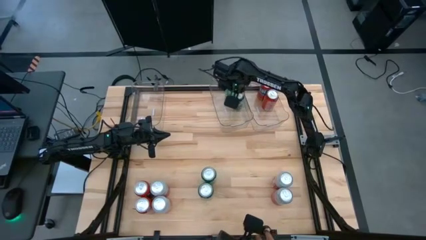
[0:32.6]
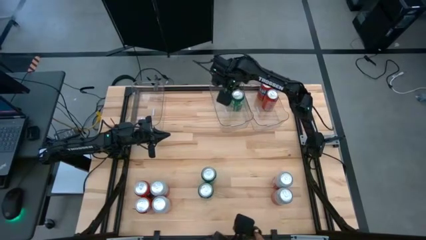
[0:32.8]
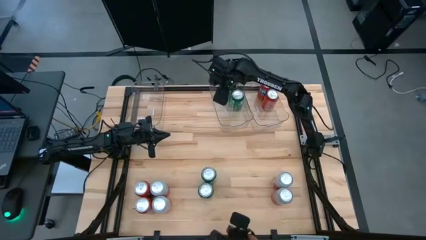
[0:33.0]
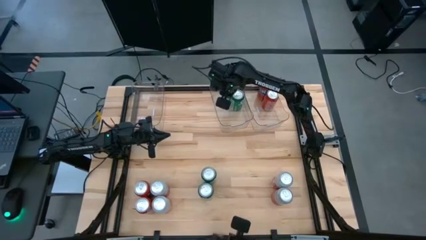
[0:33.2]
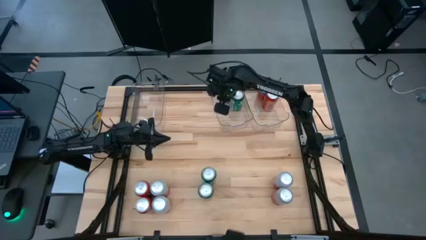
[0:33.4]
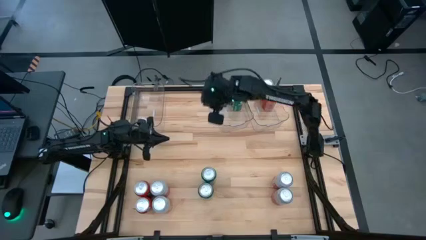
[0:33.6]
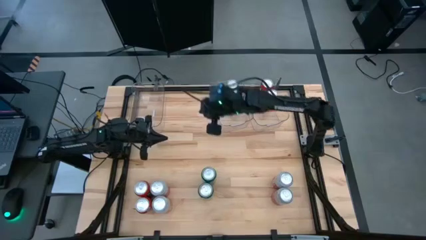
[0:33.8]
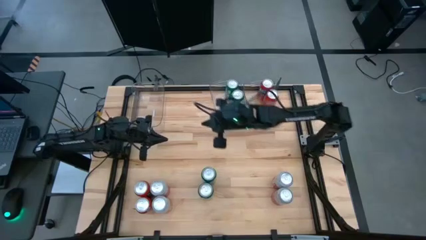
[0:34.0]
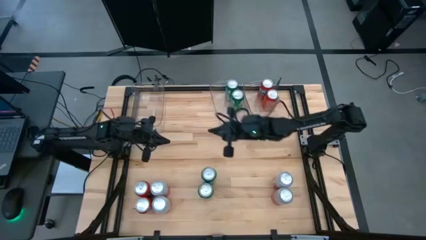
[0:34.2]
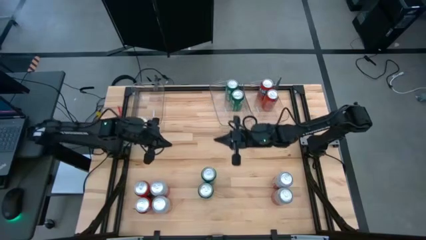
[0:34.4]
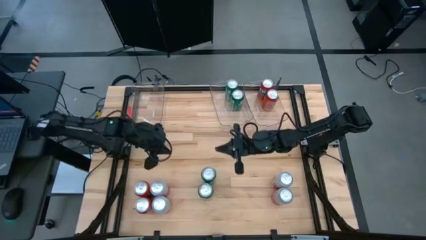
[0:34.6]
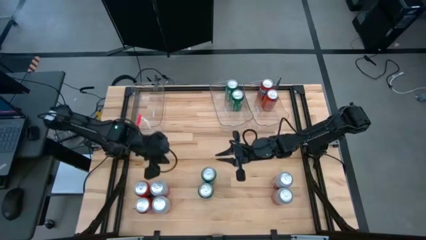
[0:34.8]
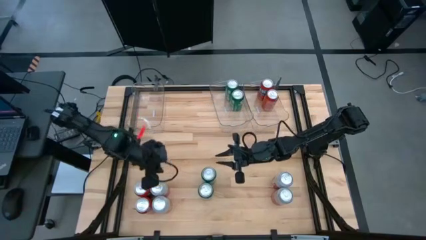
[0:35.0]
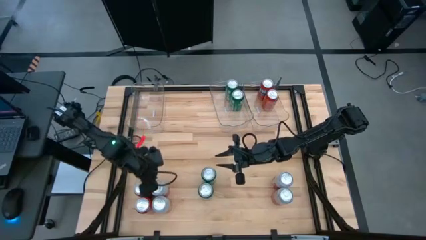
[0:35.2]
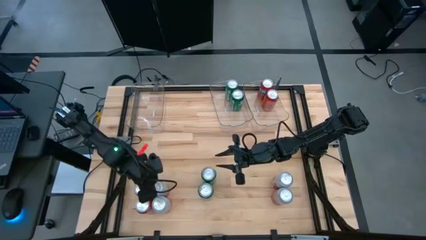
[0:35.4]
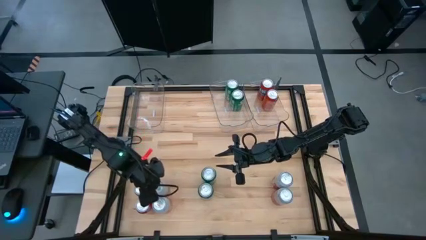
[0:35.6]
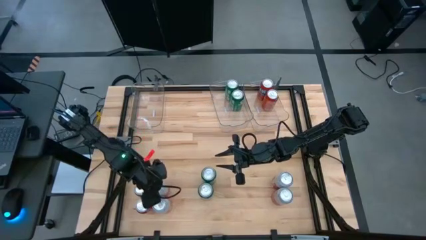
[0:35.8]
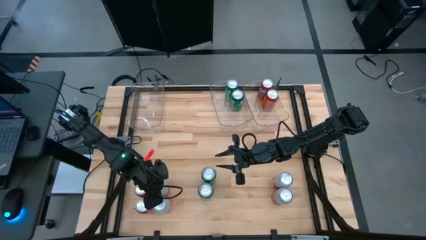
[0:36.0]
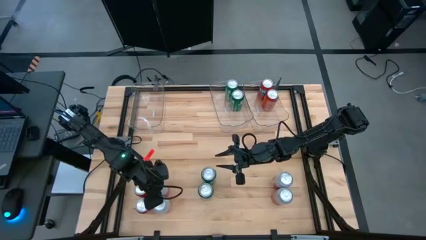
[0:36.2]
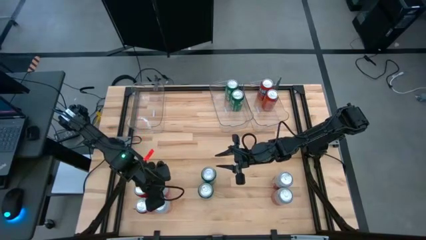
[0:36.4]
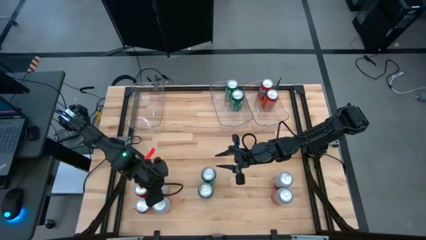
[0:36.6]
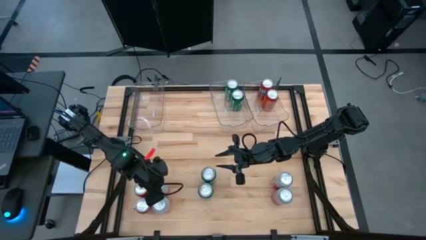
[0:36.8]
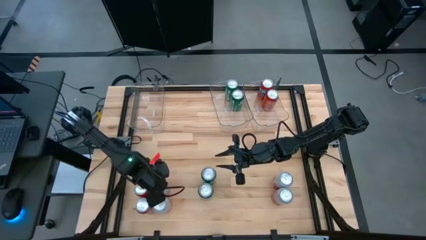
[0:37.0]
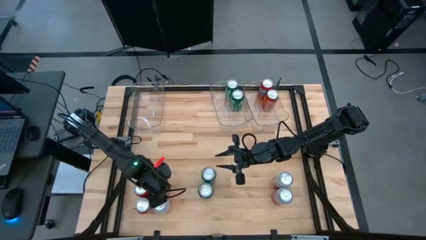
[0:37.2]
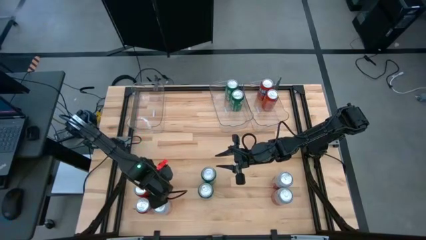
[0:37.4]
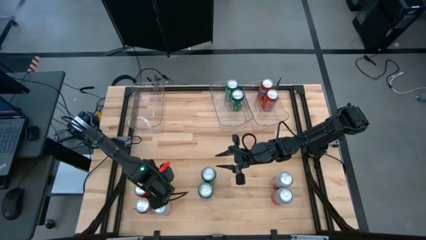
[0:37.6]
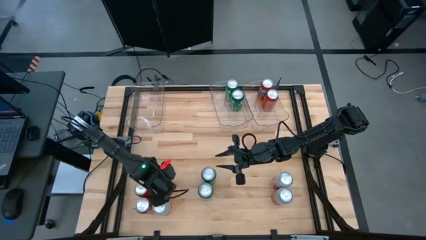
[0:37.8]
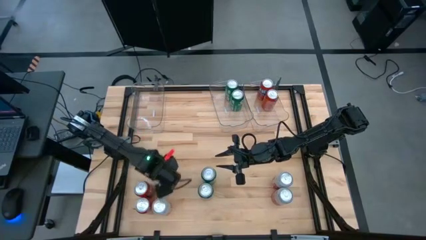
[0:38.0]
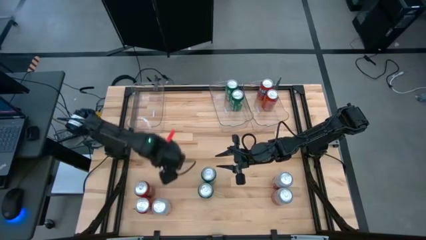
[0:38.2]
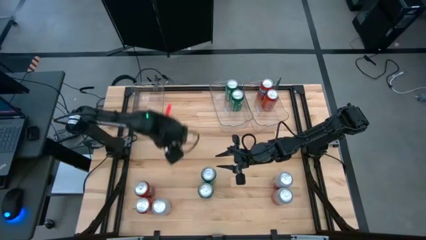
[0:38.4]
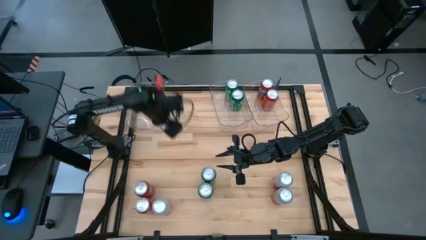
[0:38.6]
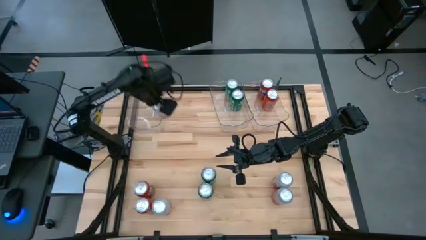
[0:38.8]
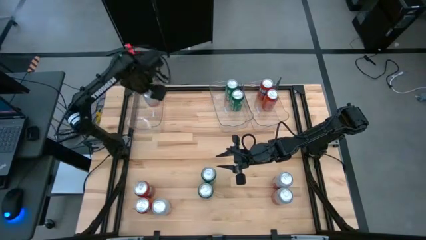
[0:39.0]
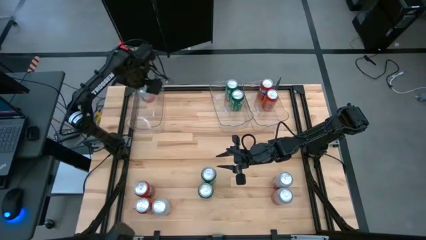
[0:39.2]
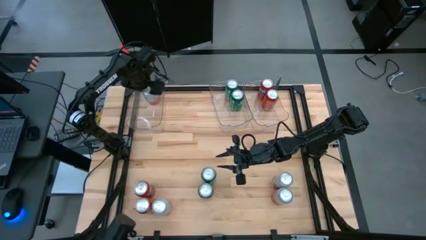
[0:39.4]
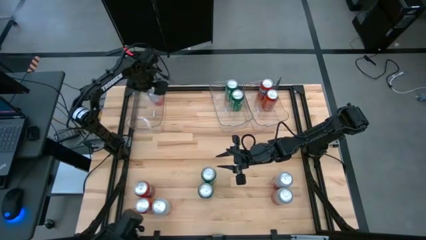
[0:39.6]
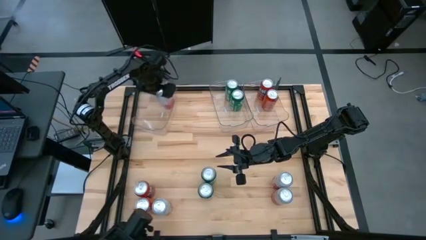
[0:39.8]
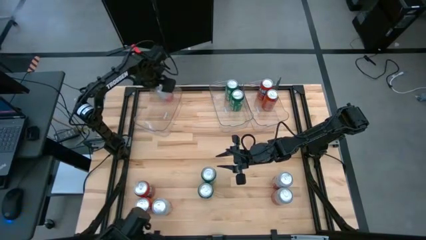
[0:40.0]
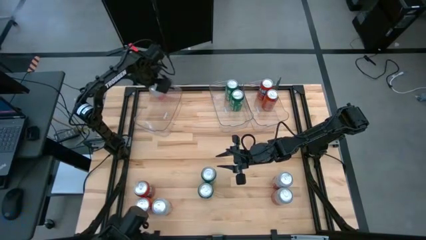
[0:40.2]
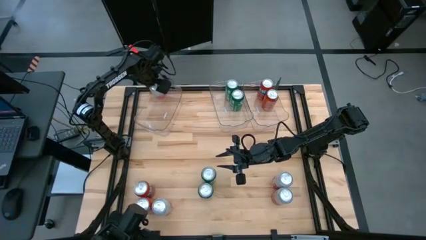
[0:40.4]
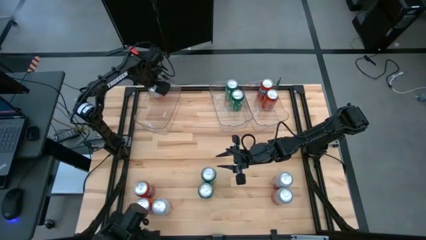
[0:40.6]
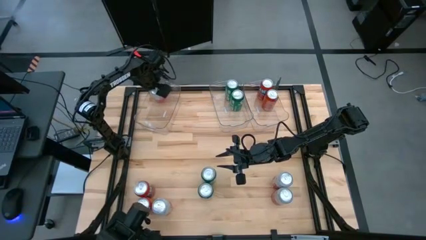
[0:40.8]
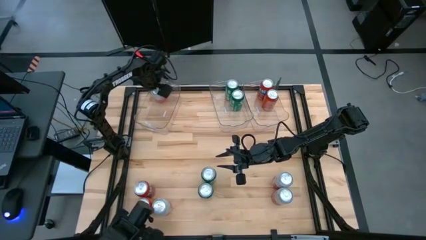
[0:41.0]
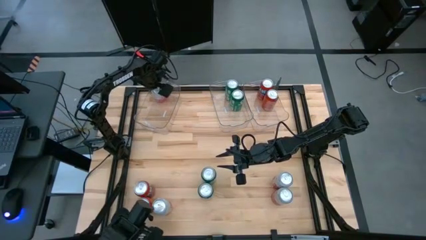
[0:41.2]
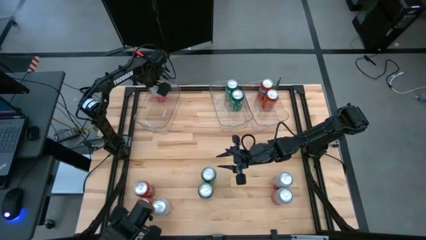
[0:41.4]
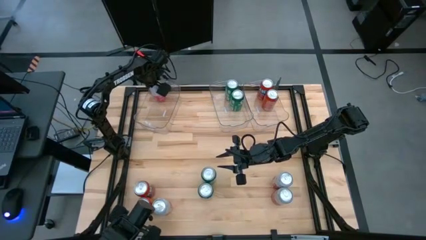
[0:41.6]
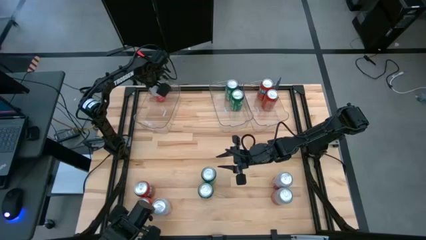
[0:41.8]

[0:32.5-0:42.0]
Task: Sort soda cans
Put the top left pink-white soda can into the left transparent bin

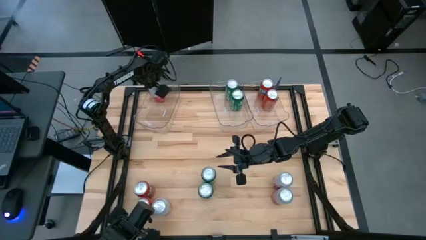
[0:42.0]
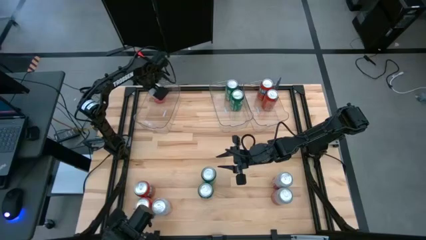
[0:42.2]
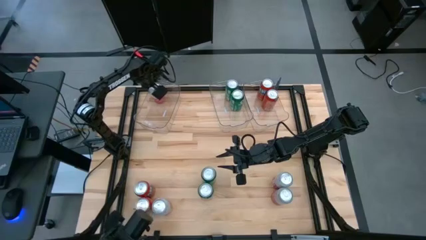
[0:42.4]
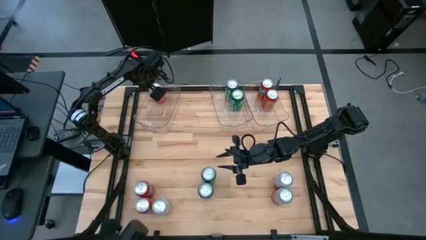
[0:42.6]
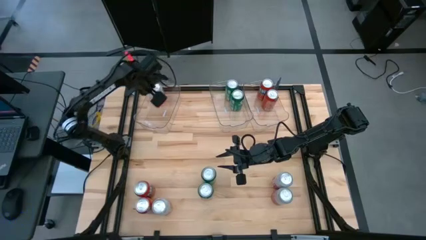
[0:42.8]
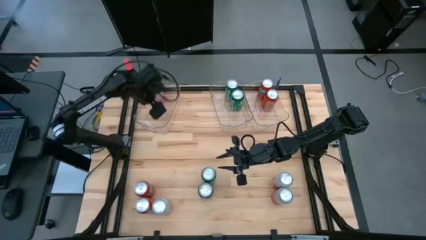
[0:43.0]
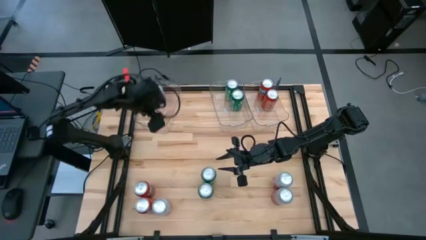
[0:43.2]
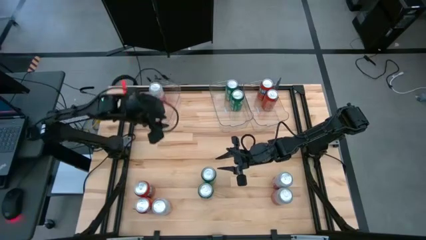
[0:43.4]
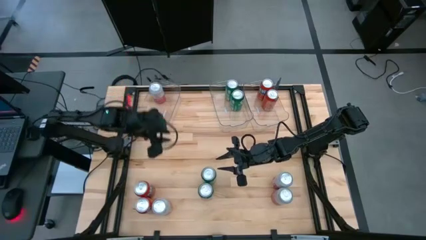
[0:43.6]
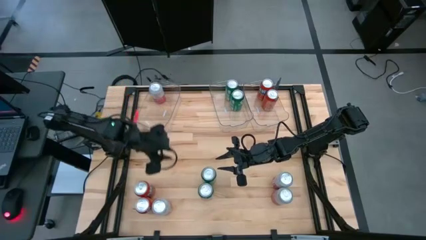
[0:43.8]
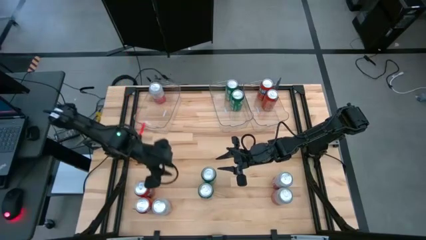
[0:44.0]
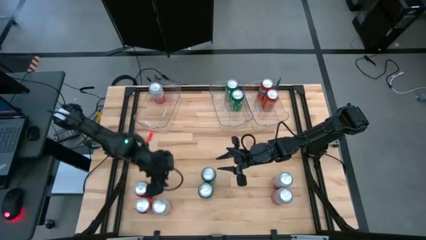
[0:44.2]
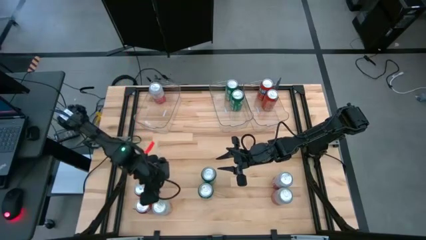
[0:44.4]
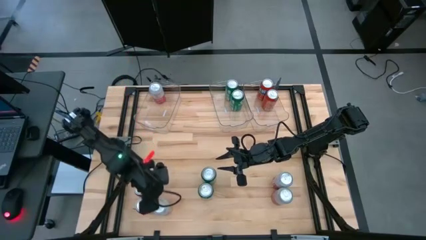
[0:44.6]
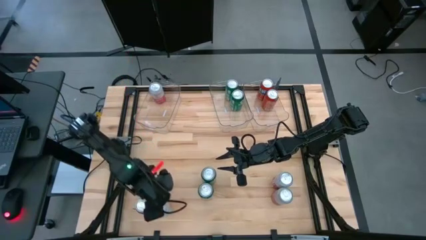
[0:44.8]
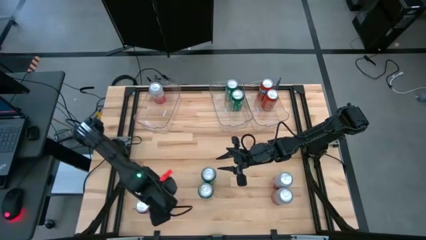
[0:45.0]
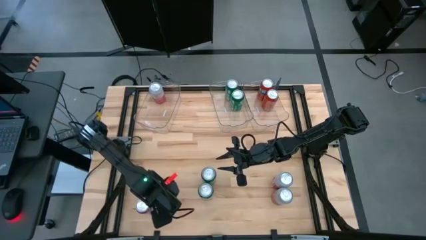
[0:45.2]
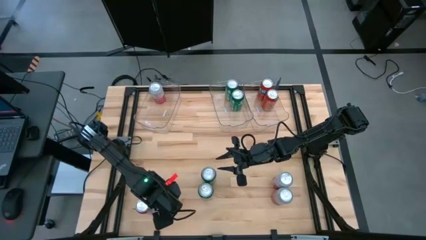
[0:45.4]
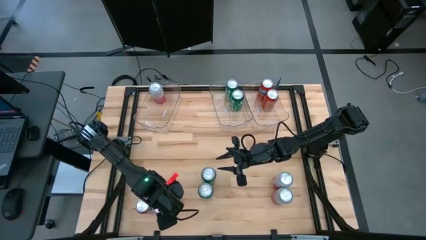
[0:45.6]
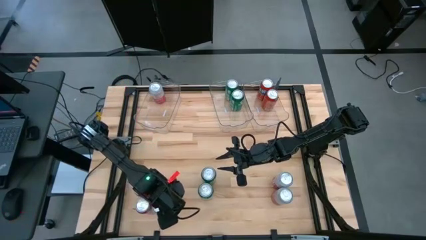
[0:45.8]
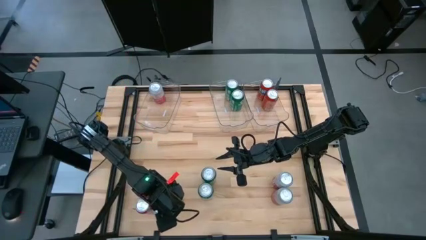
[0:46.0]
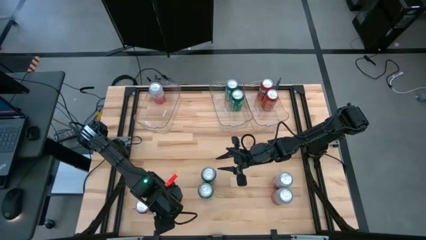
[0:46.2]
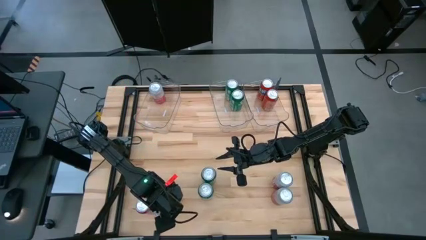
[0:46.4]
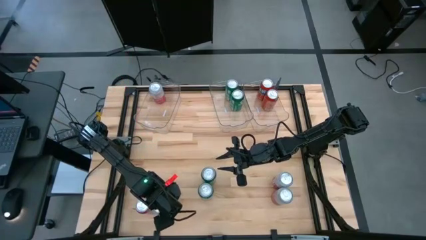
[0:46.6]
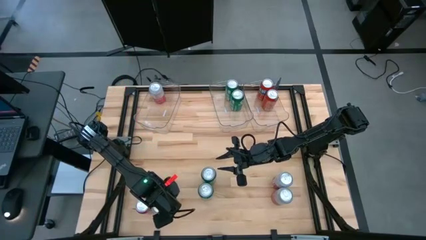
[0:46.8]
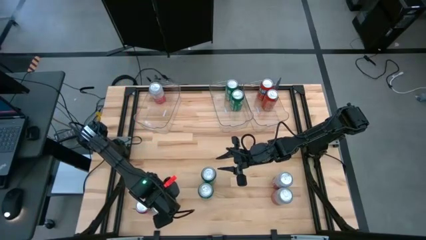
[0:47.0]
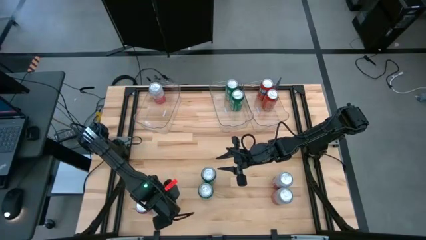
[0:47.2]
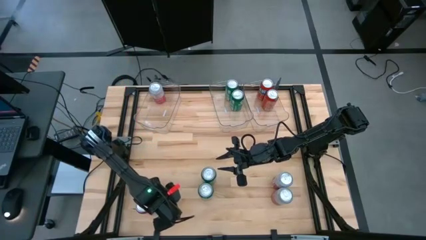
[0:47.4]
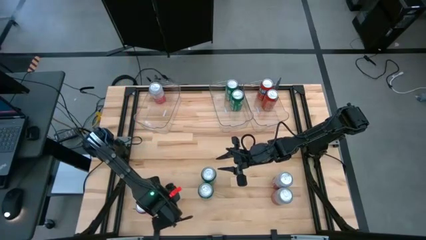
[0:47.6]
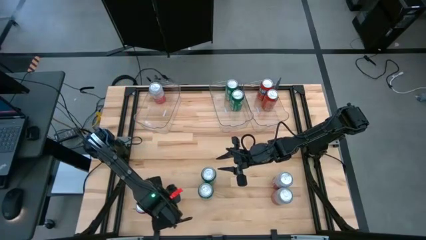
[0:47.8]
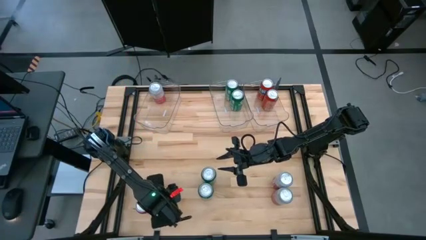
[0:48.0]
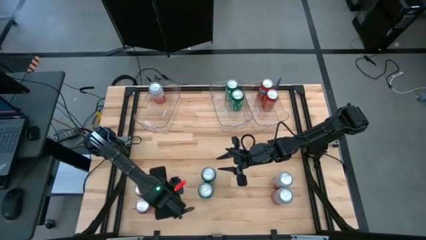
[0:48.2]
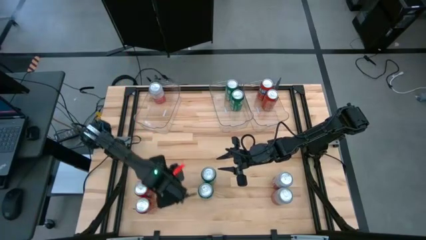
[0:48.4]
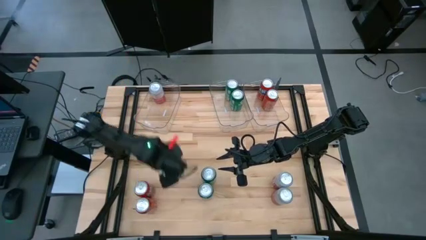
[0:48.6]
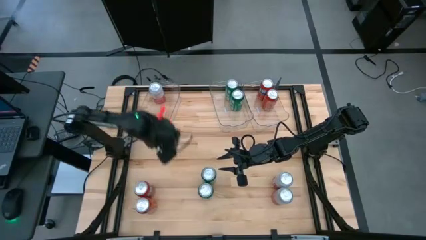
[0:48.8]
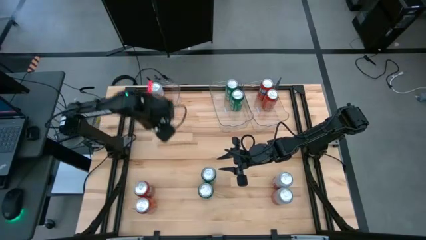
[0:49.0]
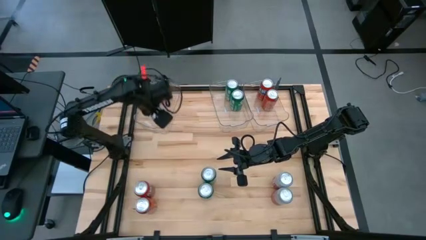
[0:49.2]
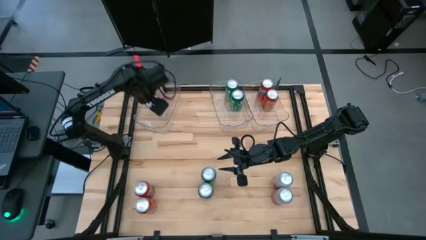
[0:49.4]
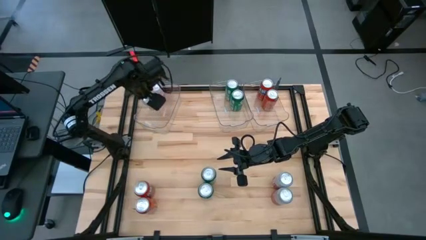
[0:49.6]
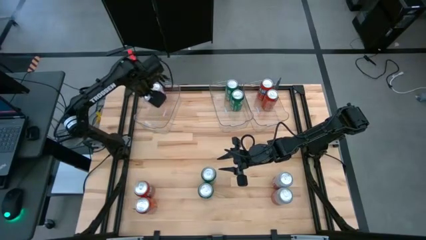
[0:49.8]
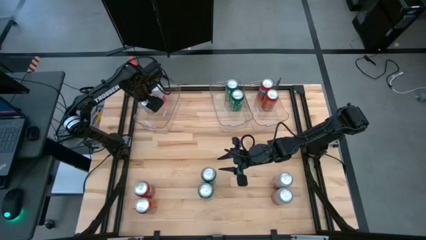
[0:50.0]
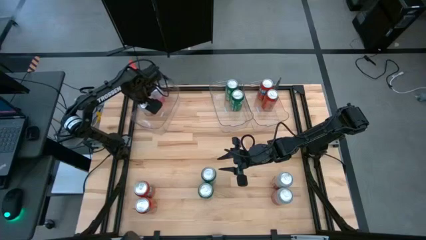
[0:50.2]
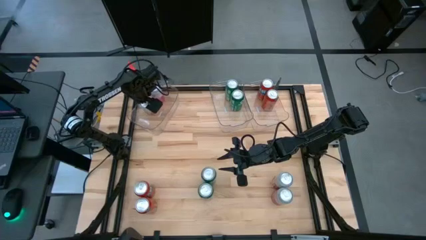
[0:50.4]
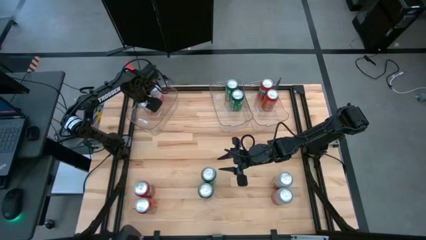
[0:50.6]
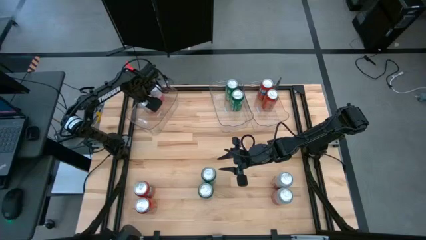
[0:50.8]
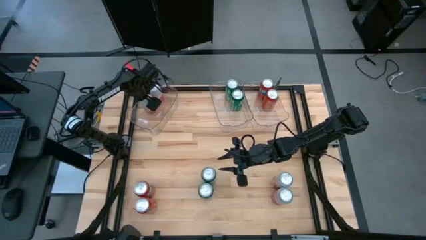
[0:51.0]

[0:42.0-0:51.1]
Put the bottom left pink-white soda can into the left transparent bin
